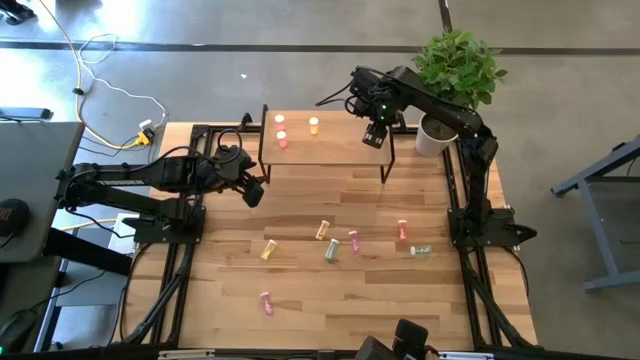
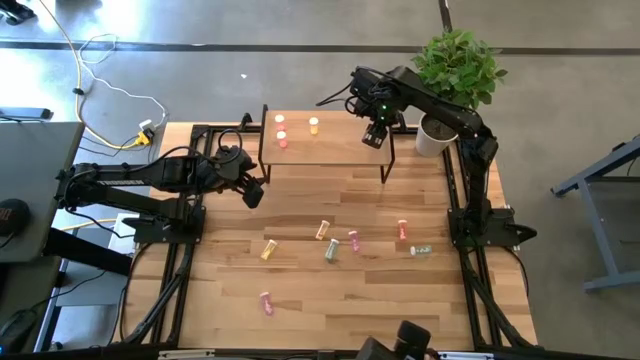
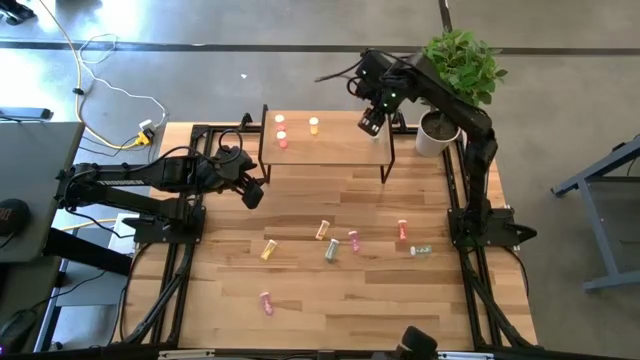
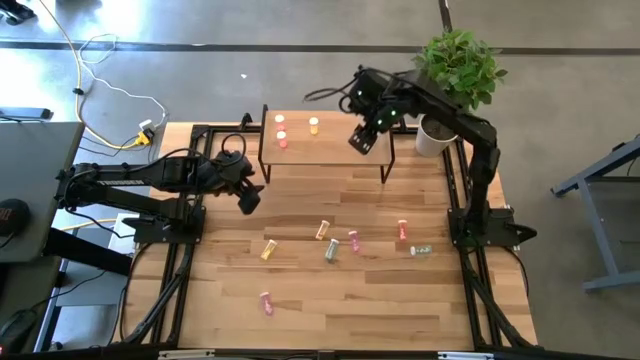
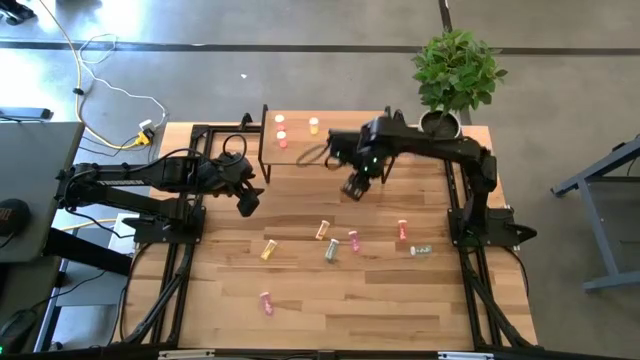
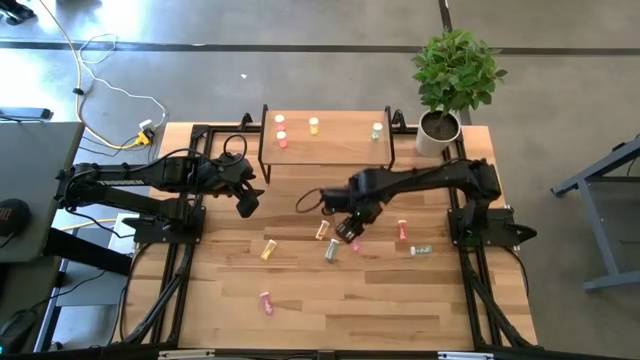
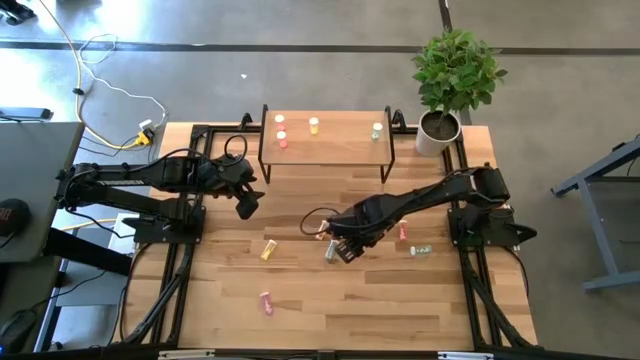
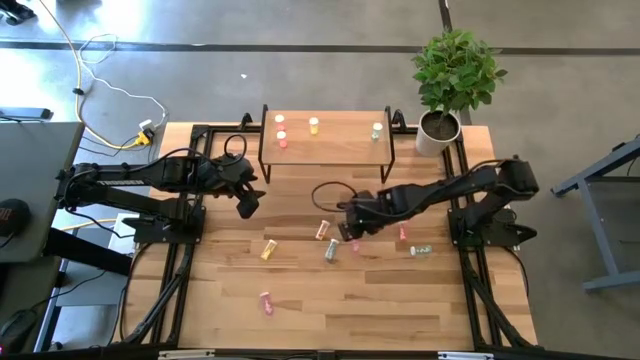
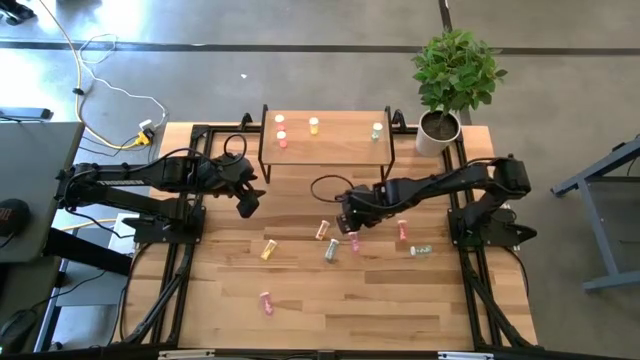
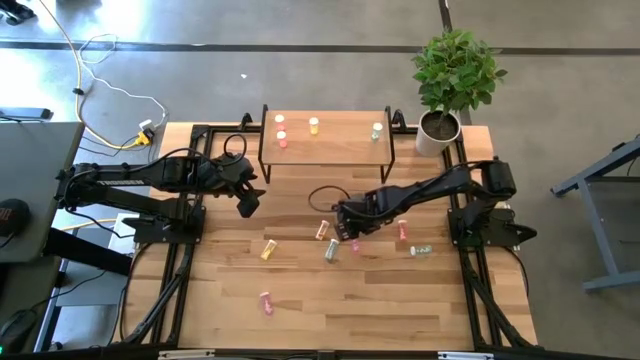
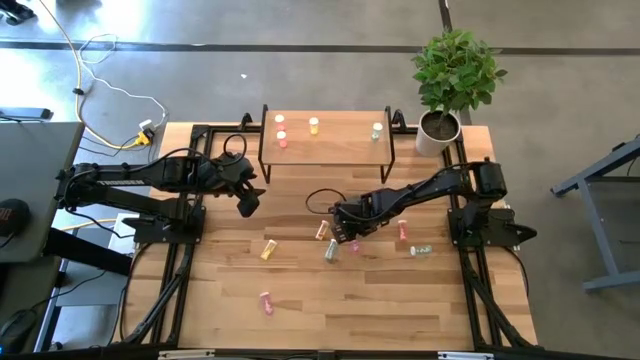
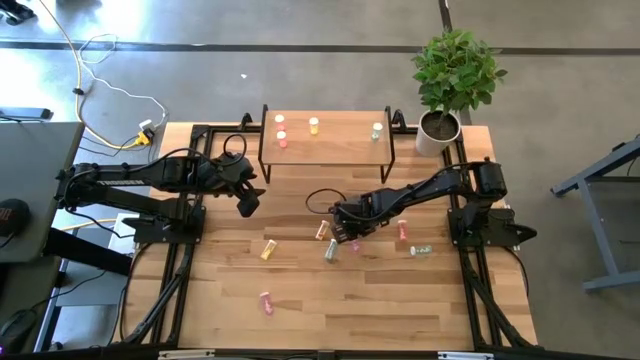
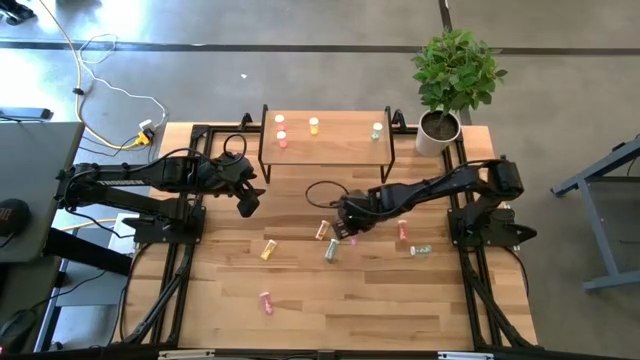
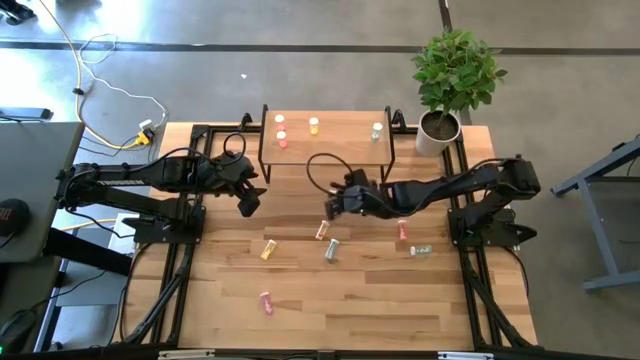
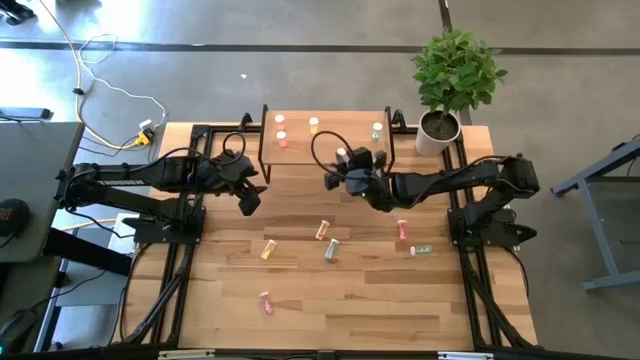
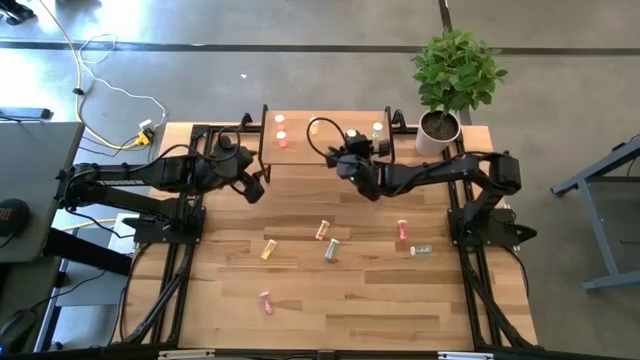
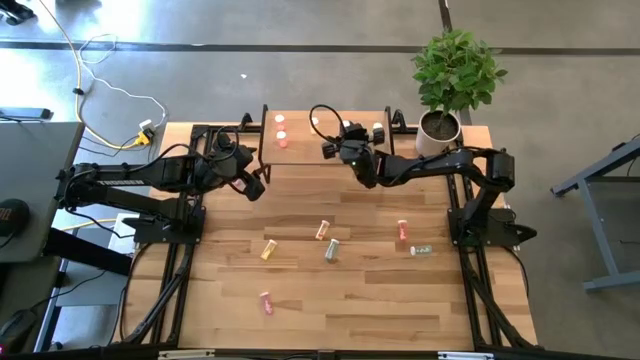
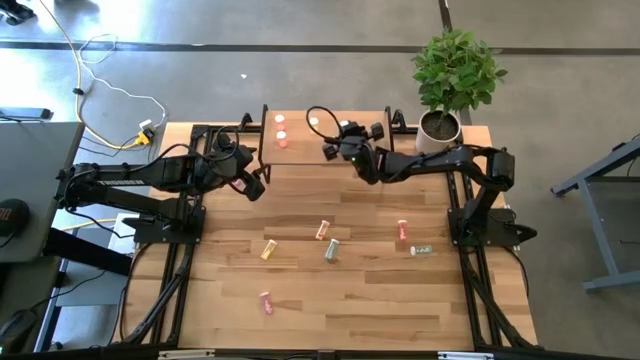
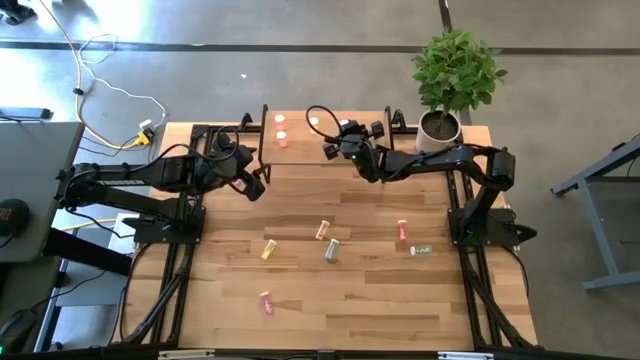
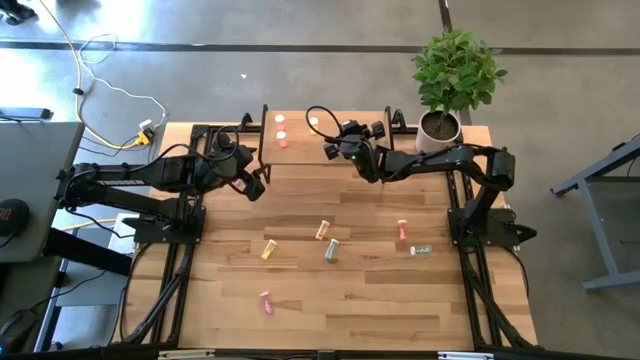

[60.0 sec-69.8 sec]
Task: Pick and place medicine bottles onto shelf by color
Put the middle purple pill bottle on the shelf

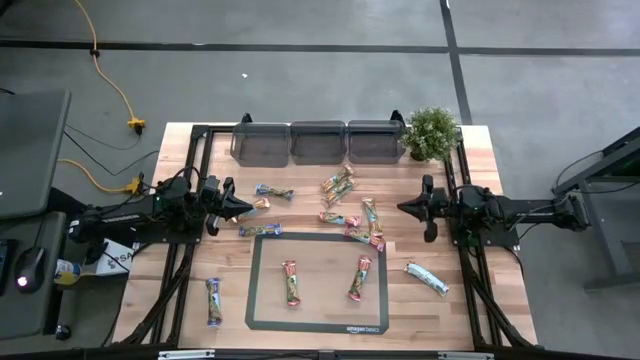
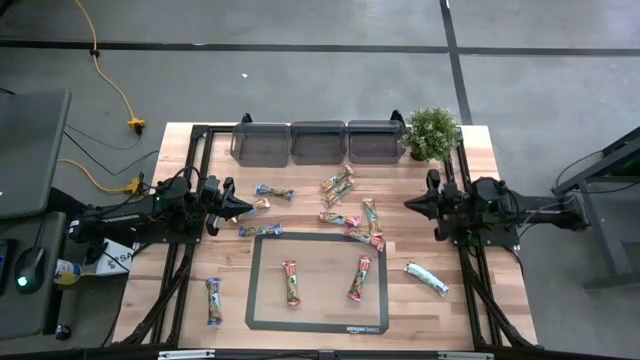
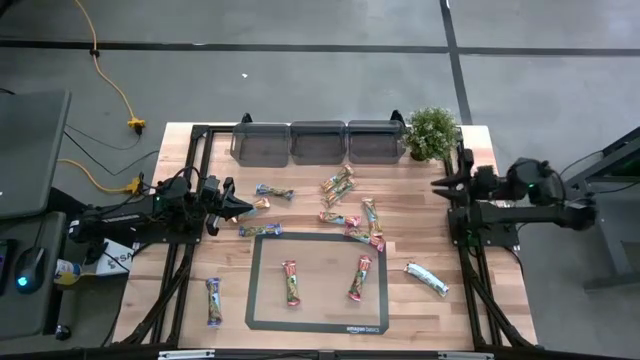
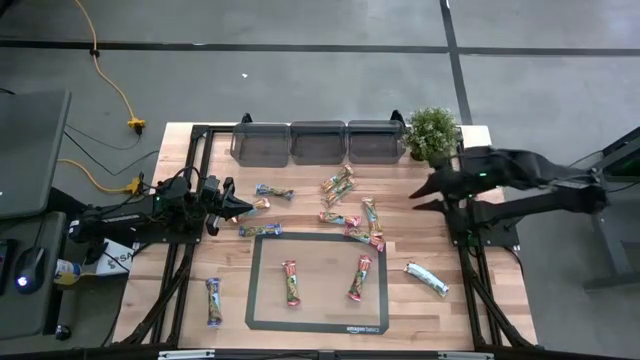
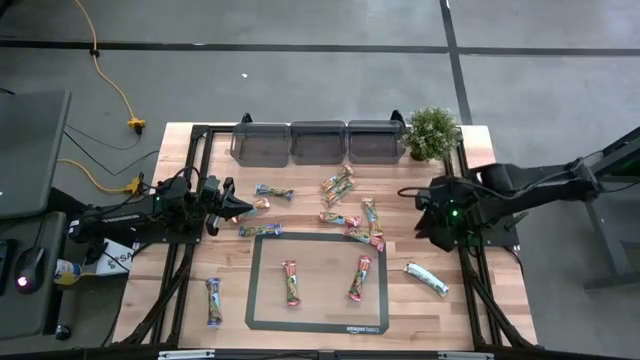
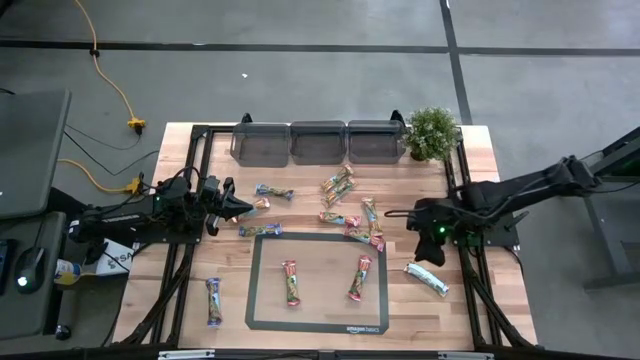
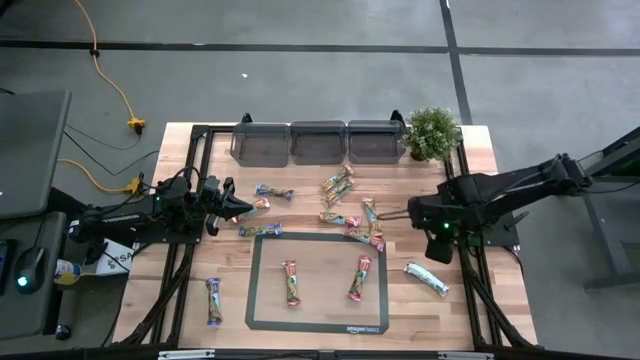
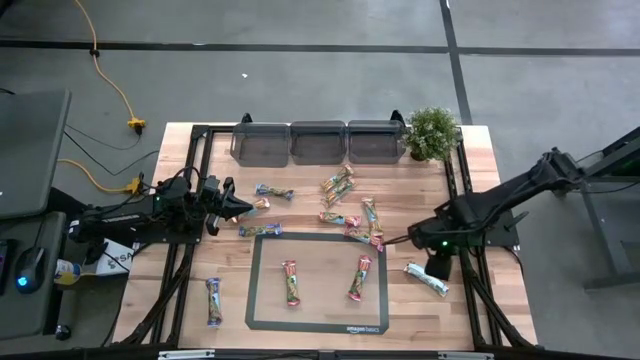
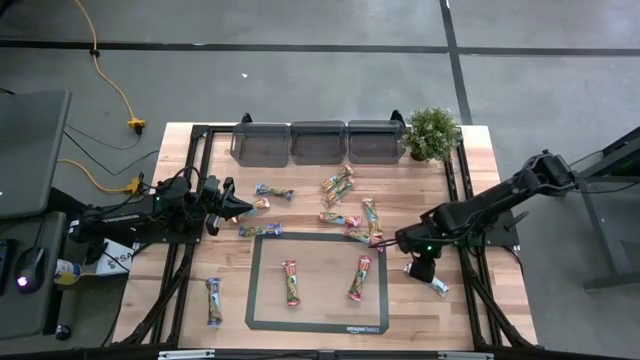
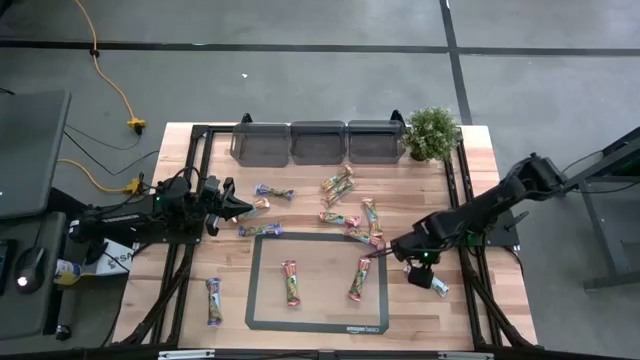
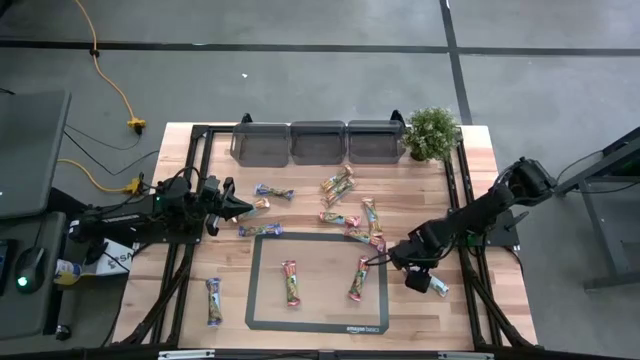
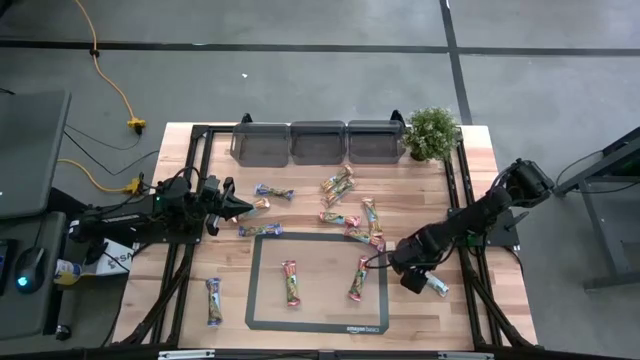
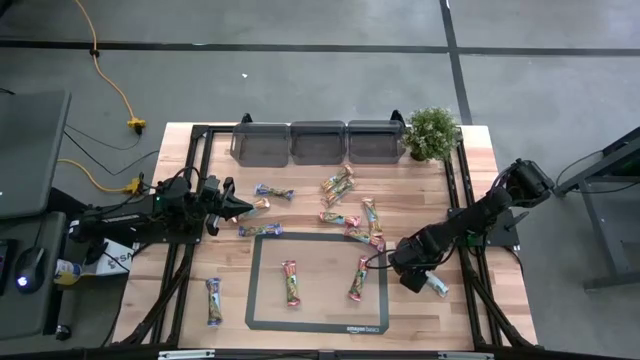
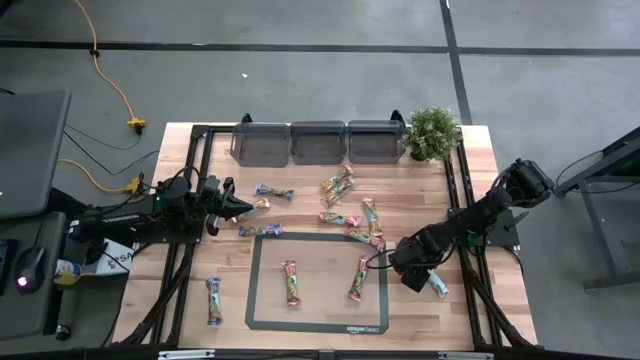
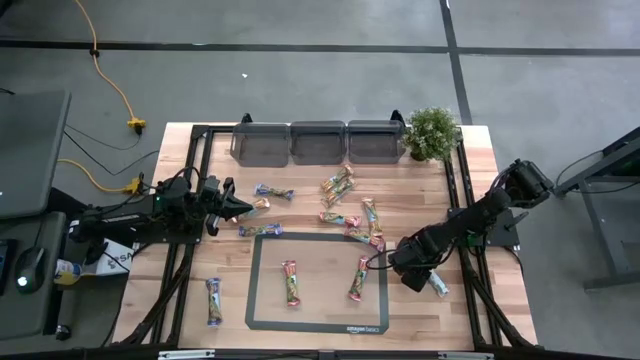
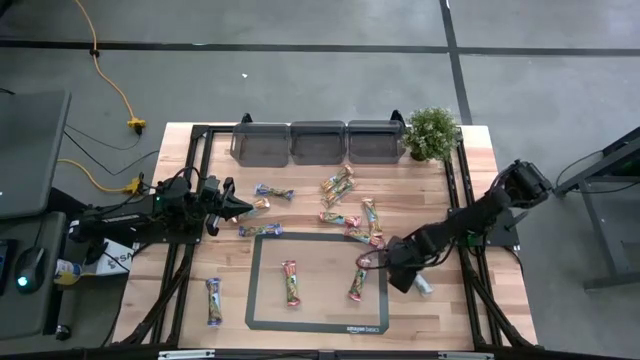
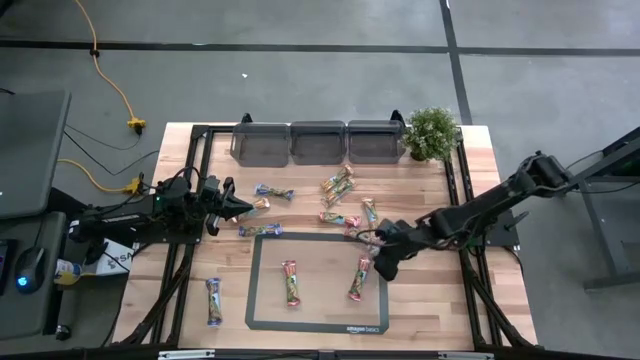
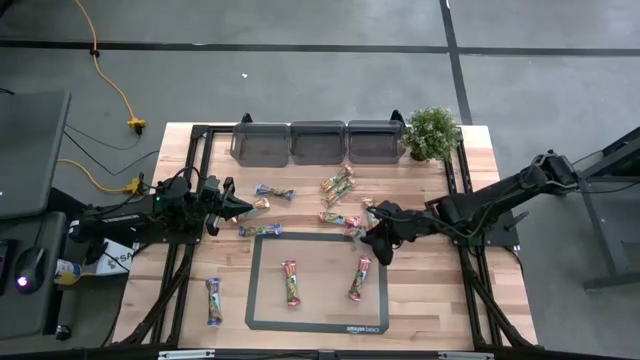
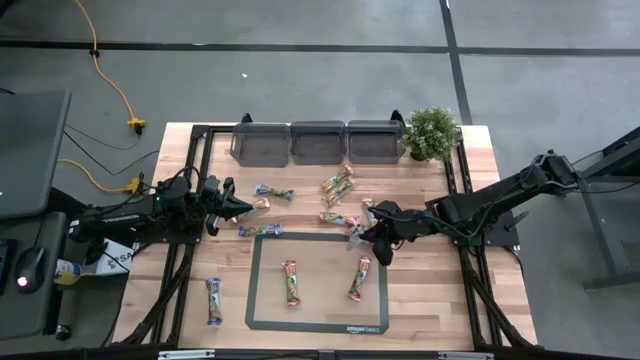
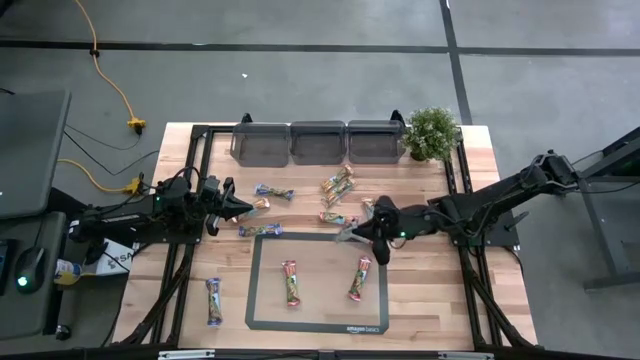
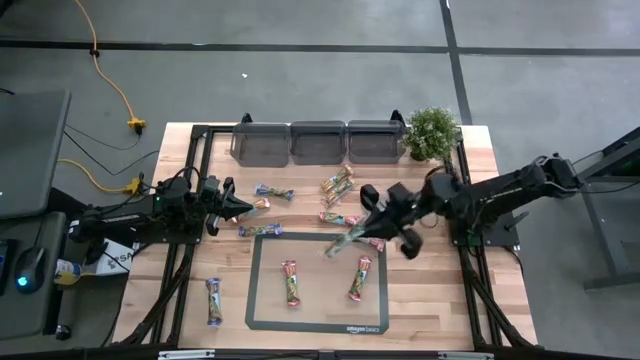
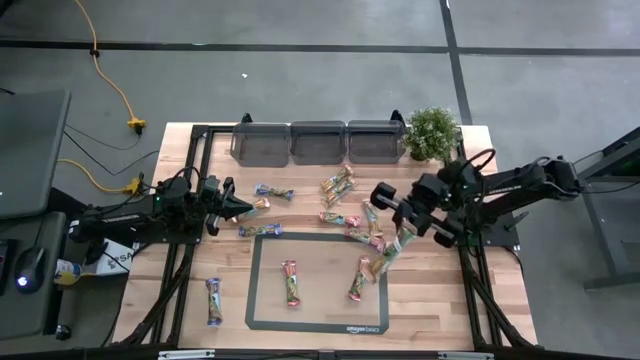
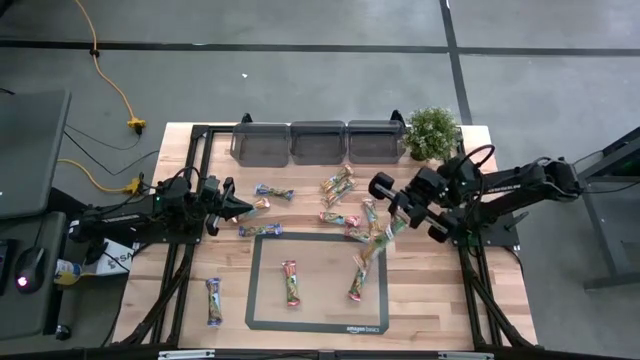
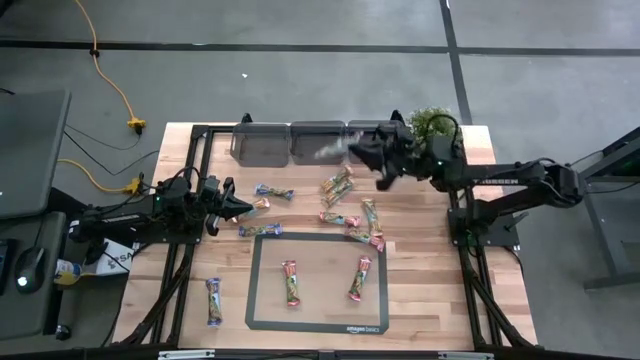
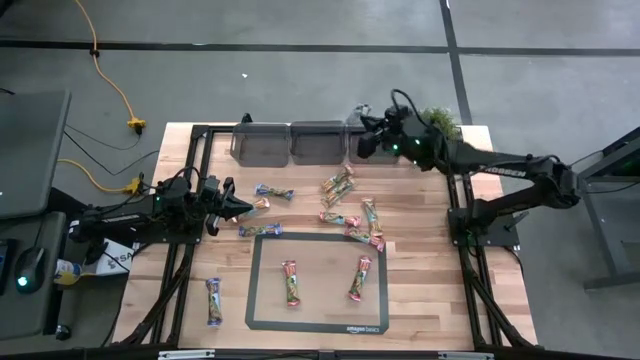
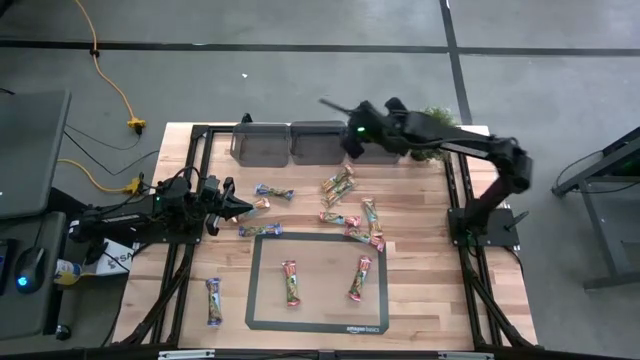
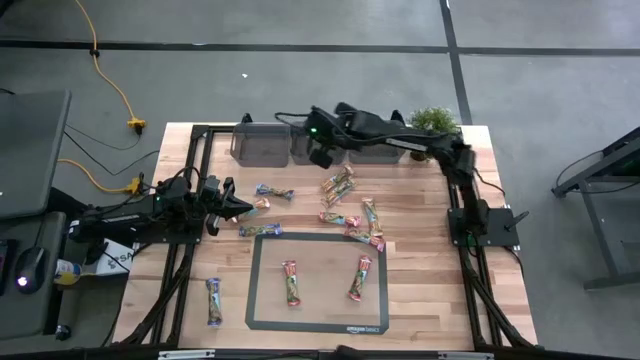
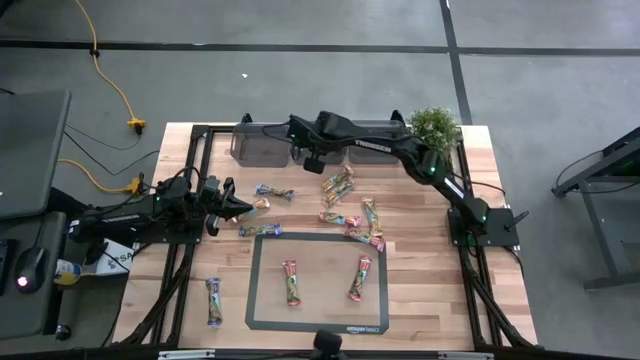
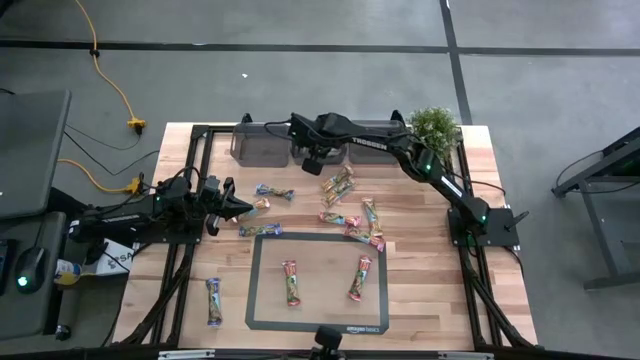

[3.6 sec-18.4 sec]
Task: Pick and place Granola Bars by type
Put the yellow granola bar into the middle black bin
